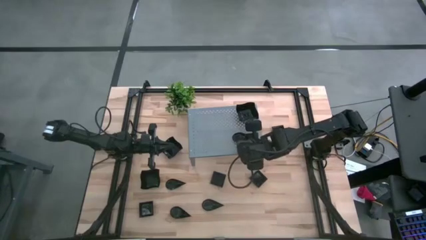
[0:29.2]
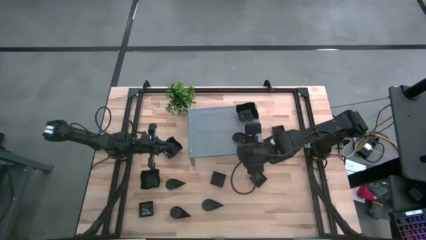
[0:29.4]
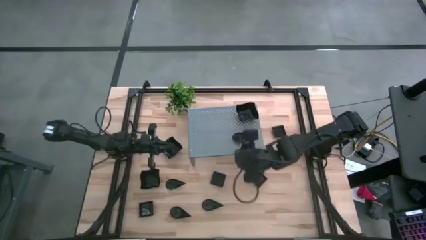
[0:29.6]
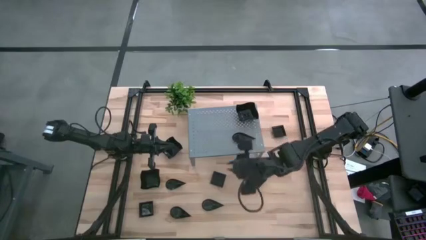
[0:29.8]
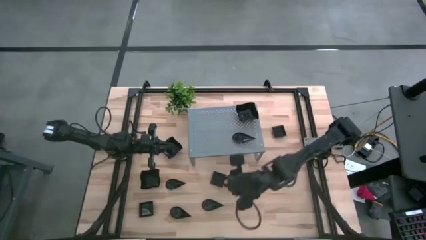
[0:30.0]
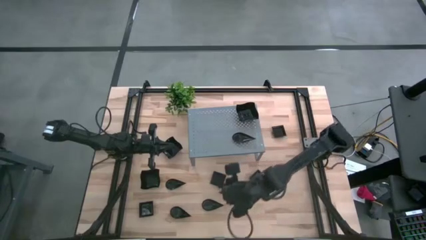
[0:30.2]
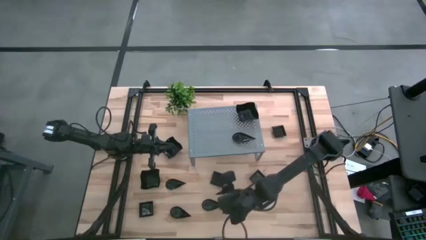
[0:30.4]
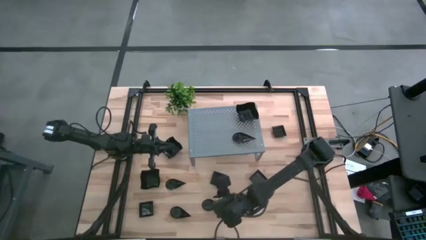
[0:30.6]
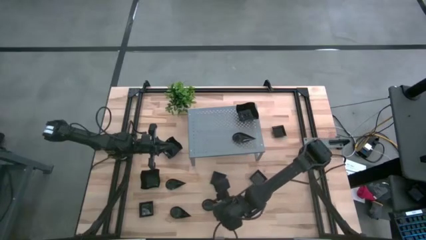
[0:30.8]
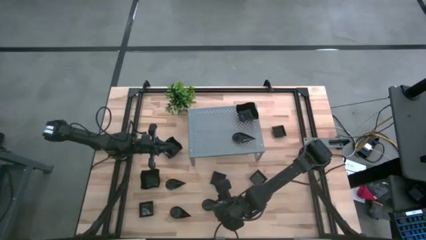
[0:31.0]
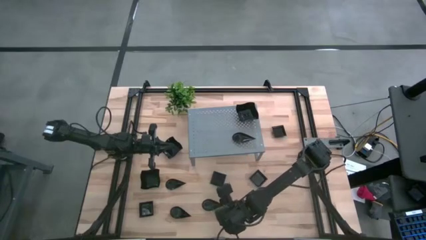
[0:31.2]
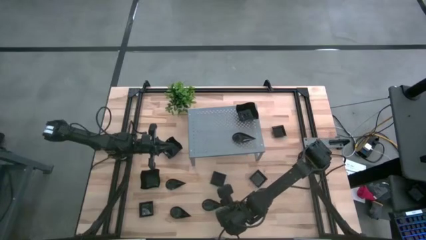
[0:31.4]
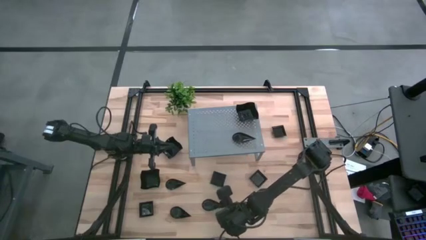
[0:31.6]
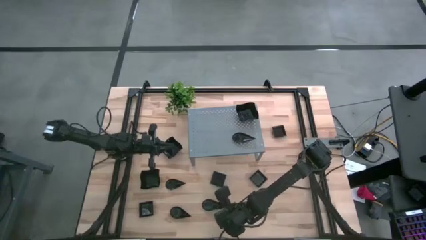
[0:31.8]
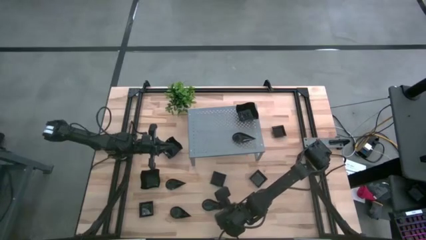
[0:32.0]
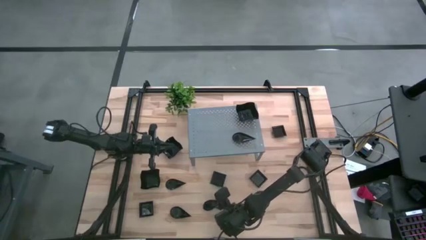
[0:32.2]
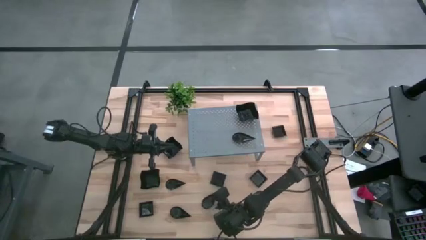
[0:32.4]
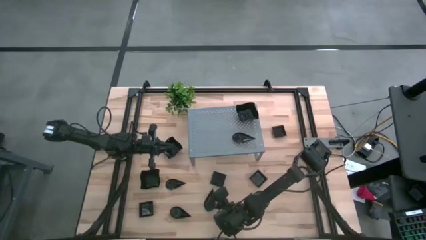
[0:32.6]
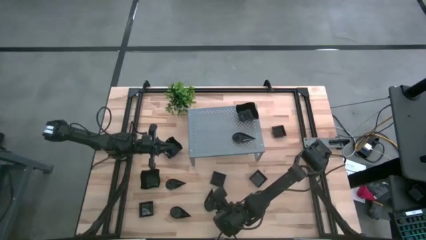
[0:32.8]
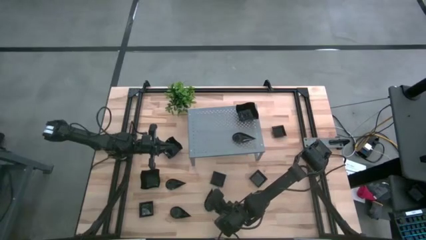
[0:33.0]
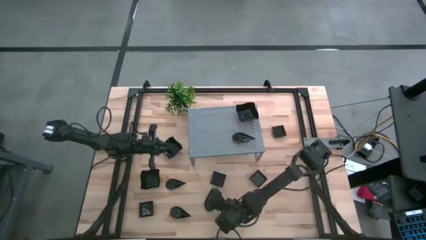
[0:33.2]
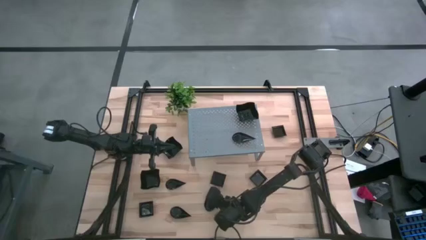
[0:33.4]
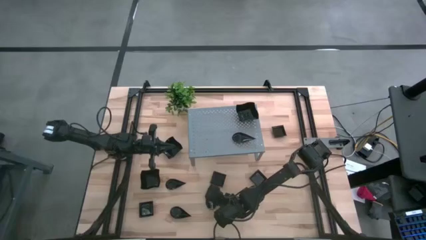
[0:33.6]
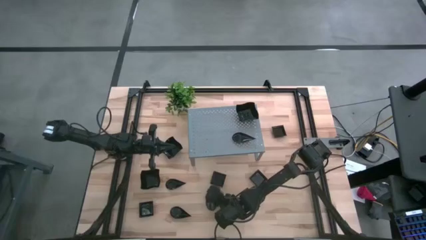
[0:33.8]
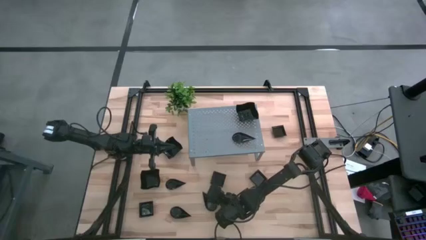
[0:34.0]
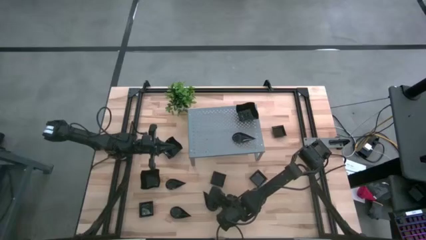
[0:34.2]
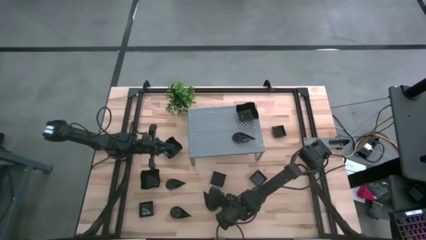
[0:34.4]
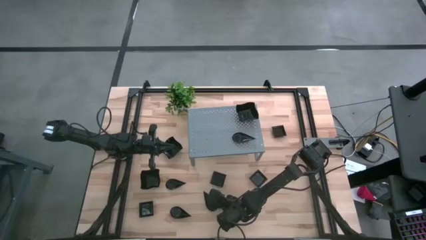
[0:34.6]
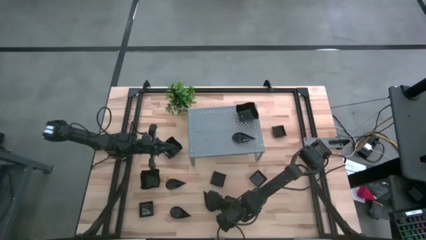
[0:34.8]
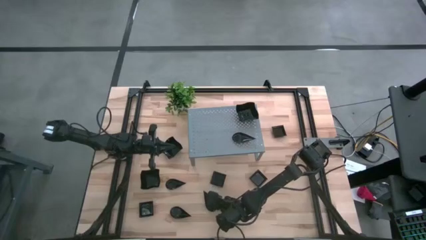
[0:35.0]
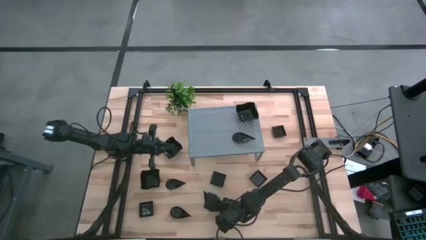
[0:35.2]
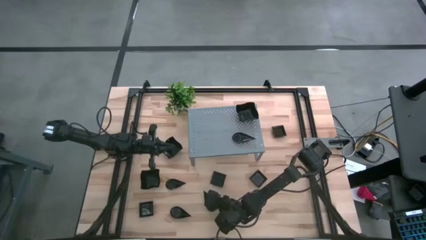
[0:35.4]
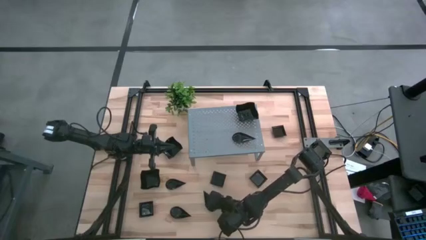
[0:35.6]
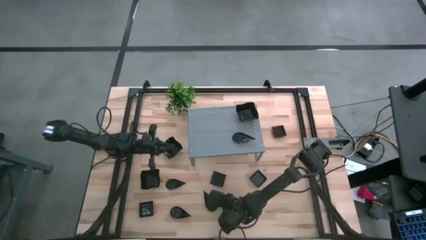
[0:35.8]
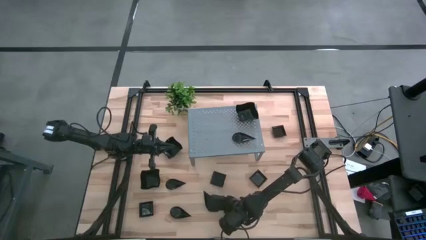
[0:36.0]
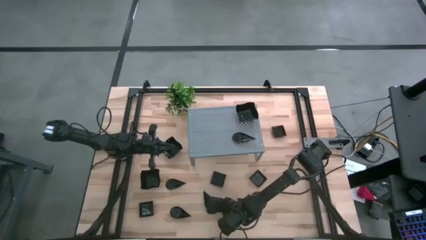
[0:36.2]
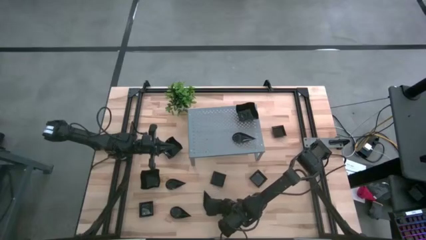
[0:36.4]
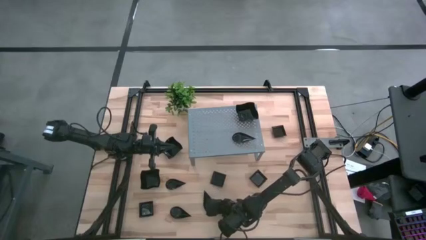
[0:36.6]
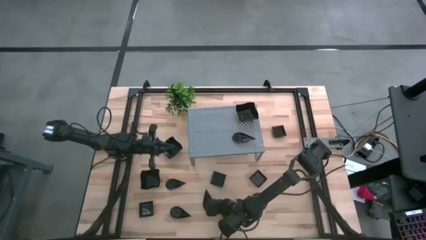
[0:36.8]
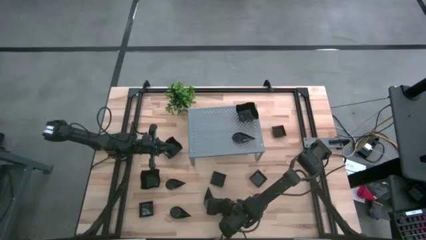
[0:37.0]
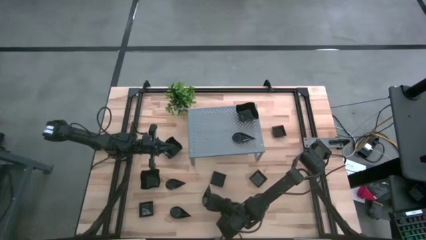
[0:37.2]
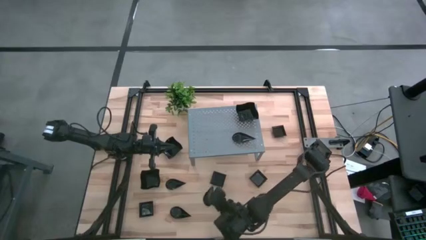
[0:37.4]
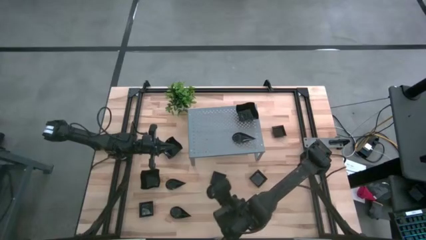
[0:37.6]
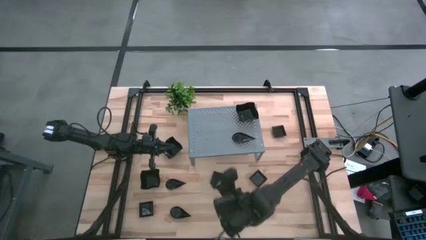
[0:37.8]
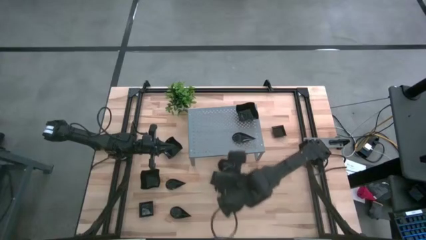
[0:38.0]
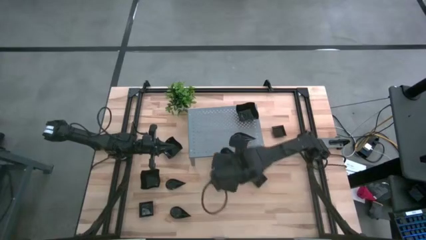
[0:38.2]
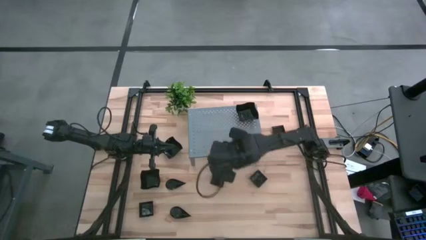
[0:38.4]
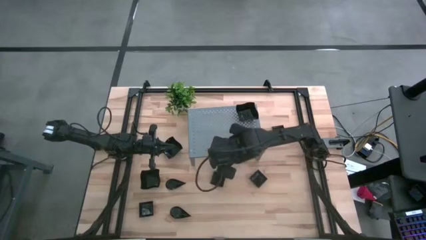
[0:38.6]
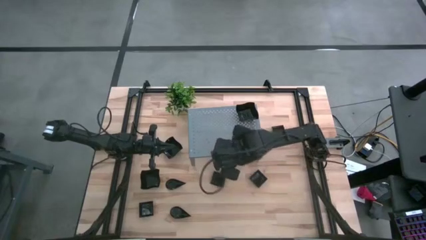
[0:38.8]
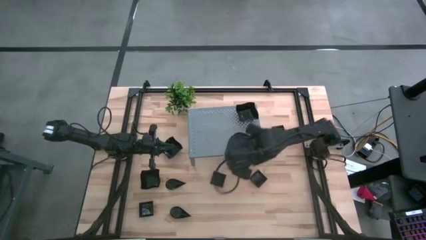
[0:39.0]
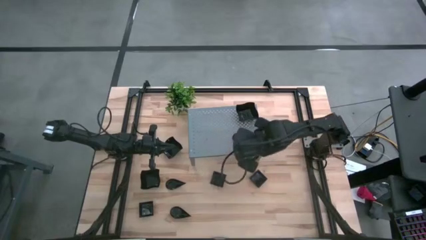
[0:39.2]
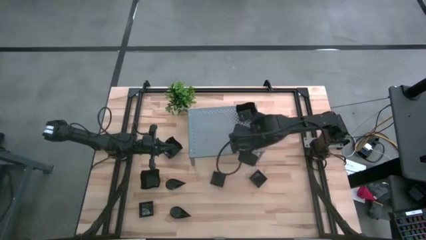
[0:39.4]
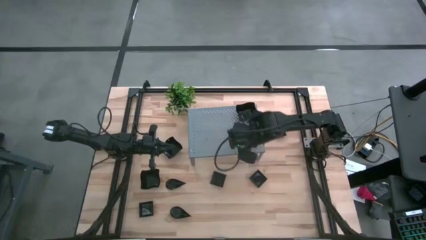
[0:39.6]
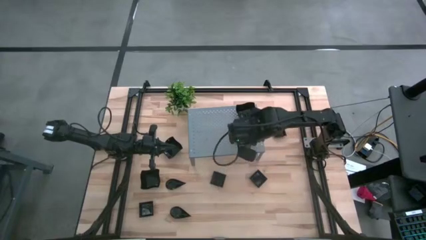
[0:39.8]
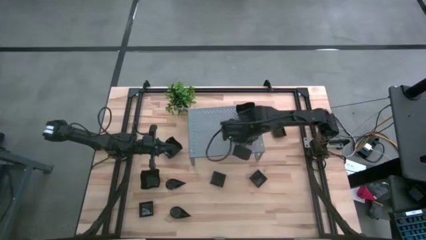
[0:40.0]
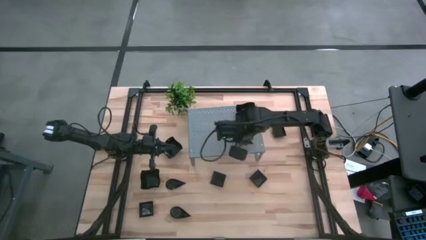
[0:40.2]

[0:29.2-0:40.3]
Task: Pick & Place Mini shaped plates
Stack the black drop-shaped plate on top of the black drop-shaped plate on the shelf

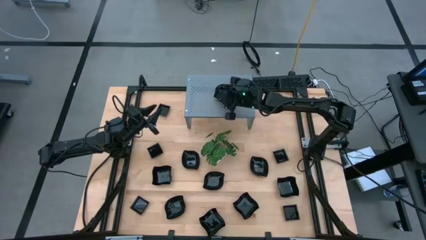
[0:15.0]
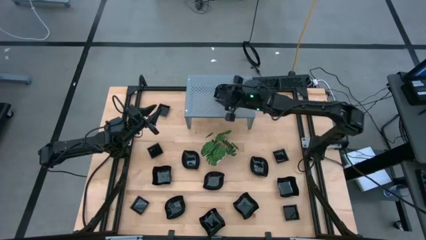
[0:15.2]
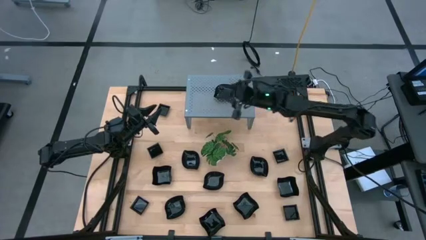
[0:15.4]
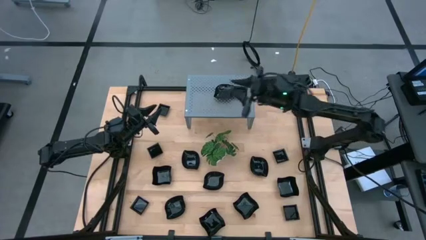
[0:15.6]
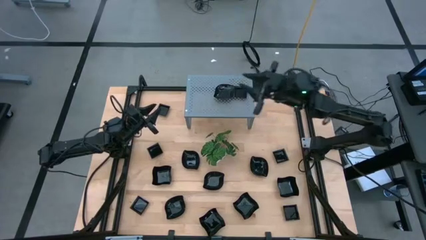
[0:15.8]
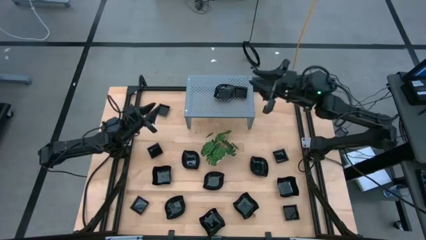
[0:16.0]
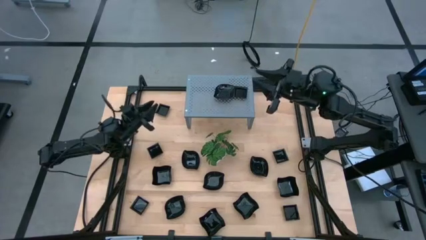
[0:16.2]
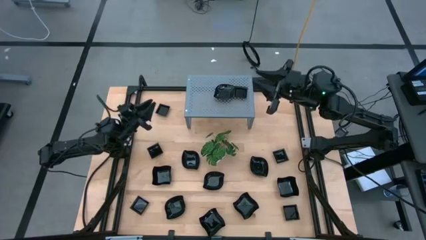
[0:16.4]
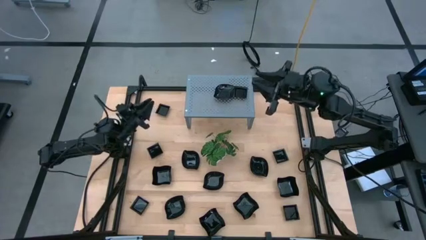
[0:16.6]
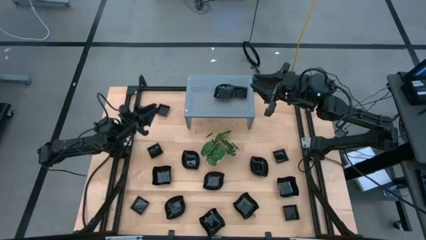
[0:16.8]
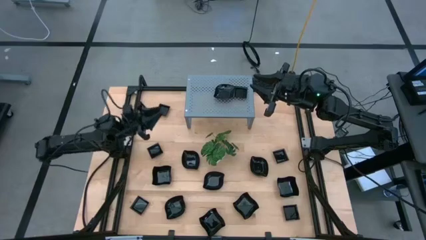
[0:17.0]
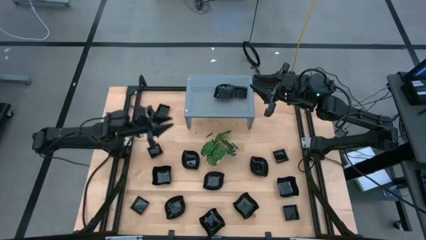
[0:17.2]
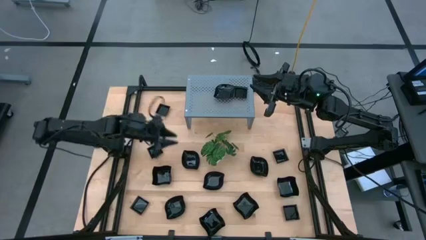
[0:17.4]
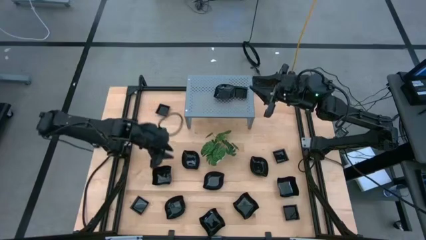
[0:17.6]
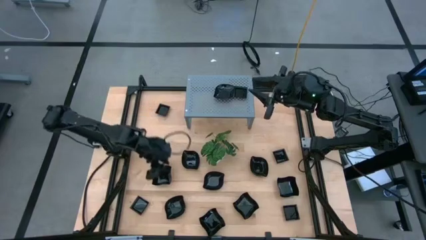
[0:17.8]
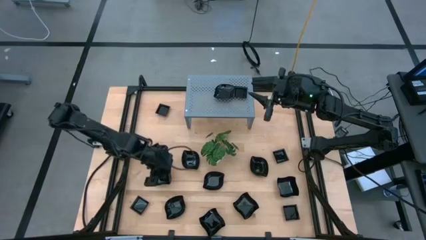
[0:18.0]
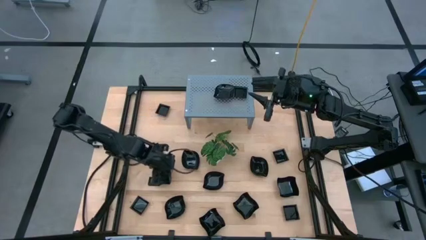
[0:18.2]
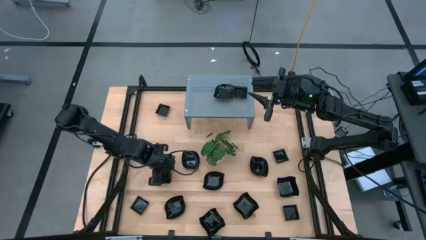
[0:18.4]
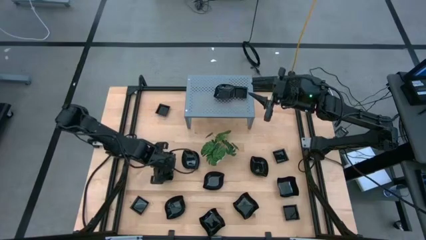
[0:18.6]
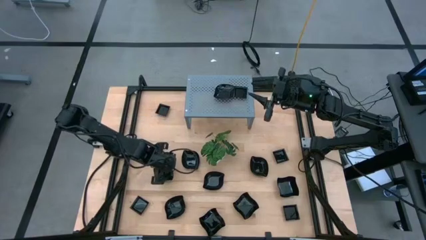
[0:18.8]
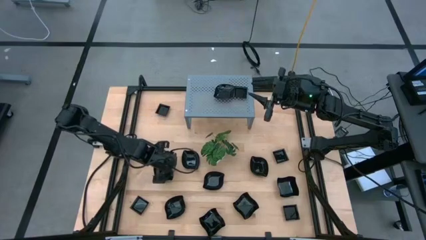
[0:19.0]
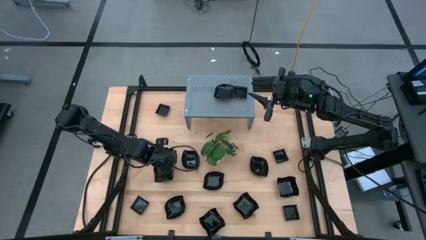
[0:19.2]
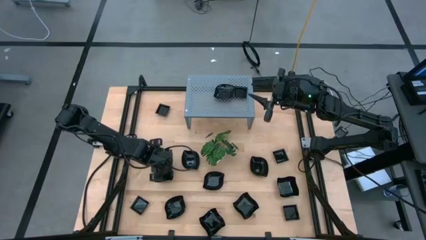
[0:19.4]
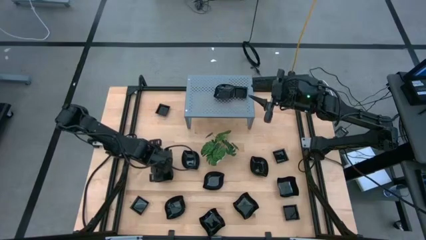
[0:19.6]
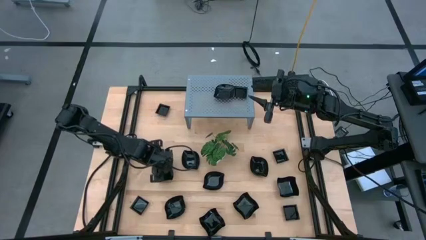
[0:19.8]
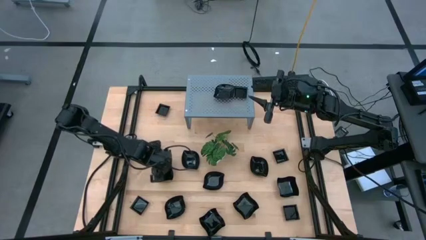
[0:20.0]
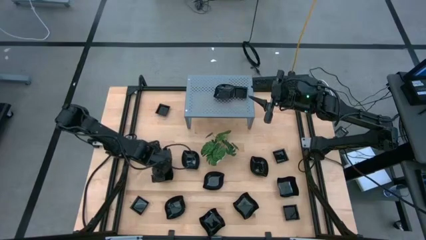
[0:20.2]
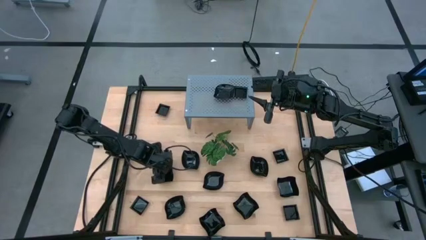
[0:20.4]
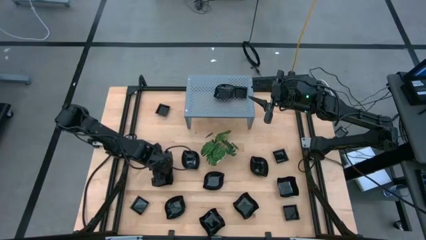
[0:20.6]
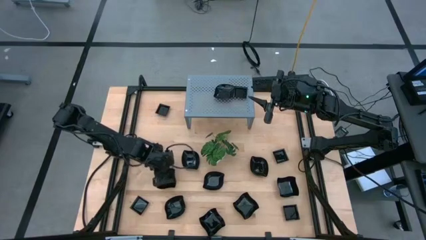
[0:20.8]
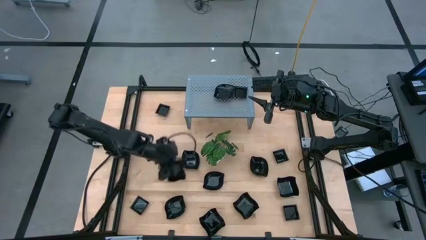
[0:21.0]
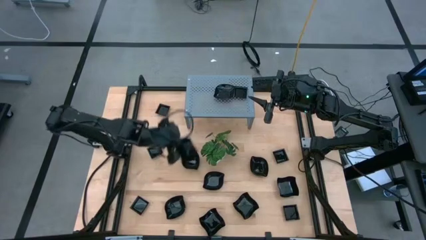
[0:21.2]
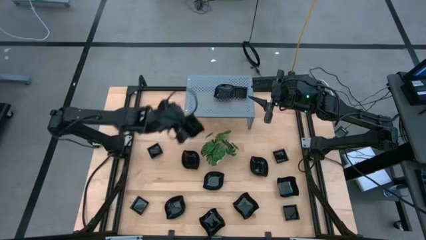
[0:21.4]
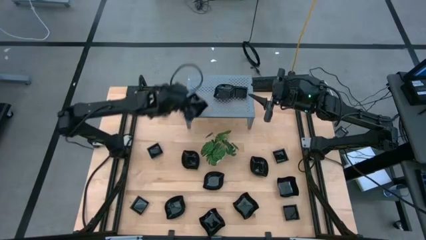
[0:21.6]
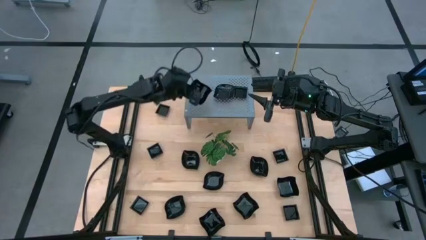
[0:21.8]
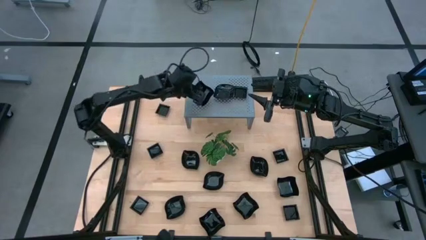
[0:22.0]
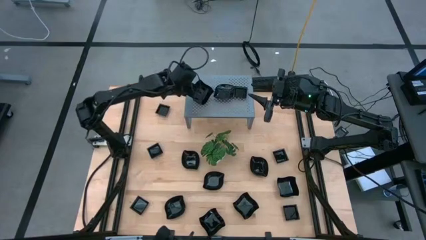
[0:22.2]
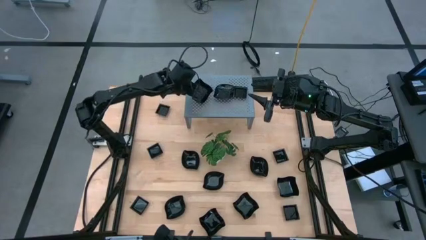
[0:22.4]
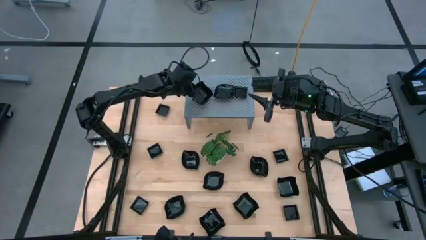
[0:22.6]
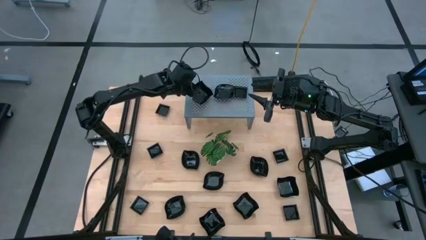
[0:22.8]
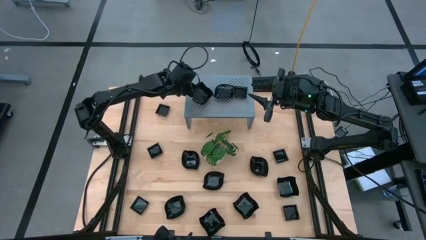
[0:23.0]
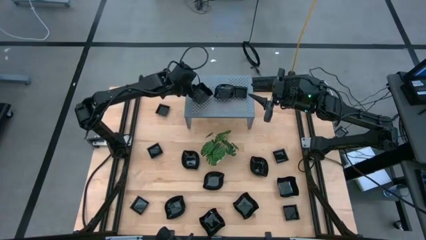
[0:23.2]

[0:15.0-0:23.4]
Task: Pick & Place Mini shaped plates
Put the distorted square plate on the shelf
